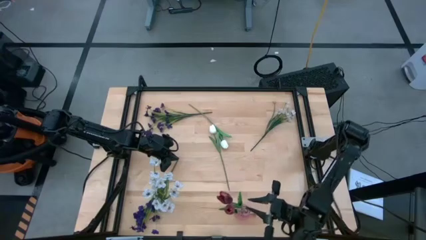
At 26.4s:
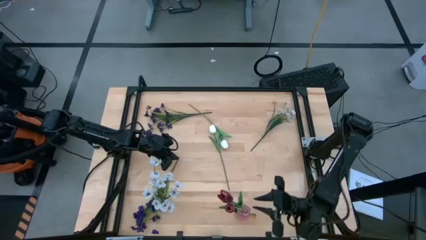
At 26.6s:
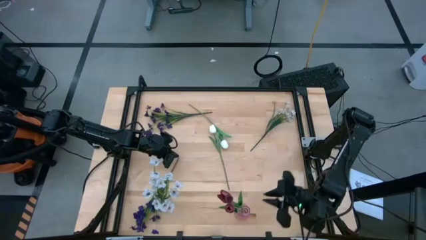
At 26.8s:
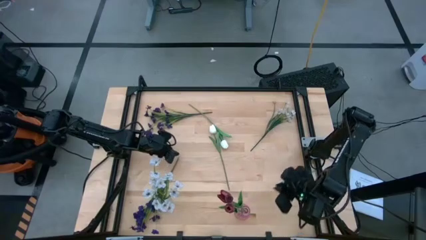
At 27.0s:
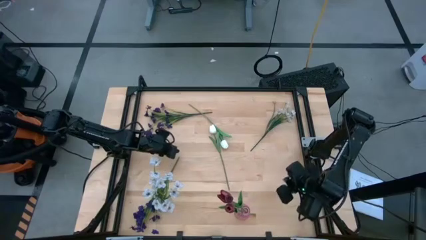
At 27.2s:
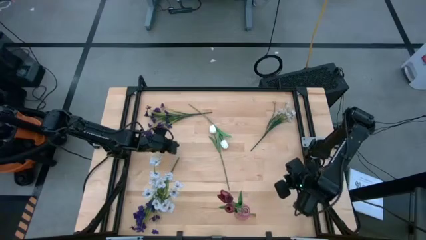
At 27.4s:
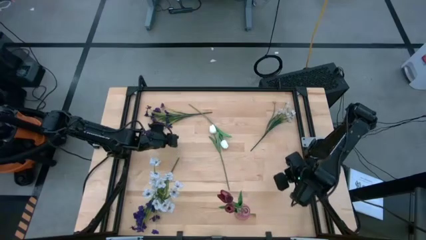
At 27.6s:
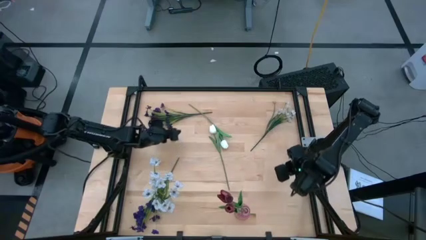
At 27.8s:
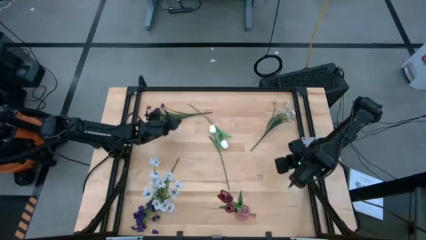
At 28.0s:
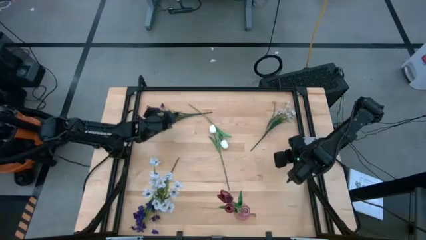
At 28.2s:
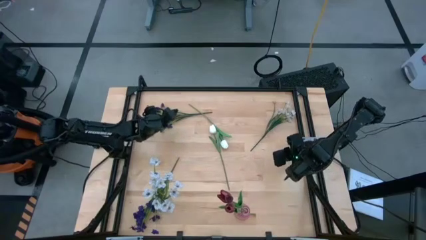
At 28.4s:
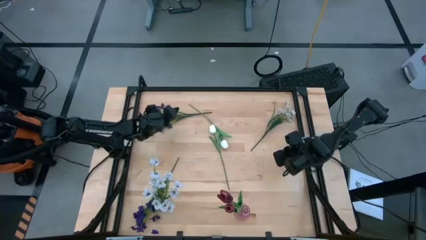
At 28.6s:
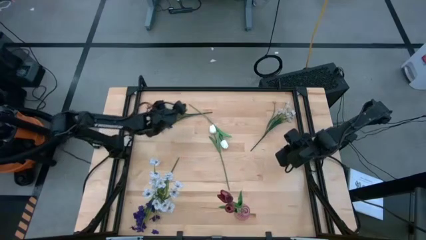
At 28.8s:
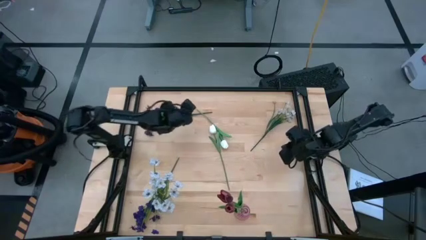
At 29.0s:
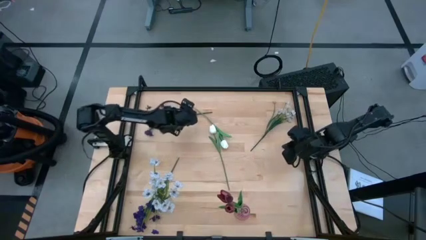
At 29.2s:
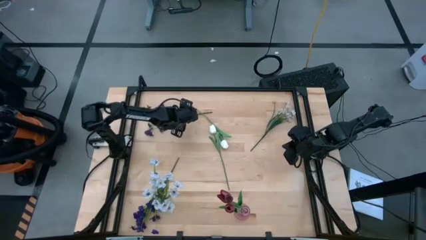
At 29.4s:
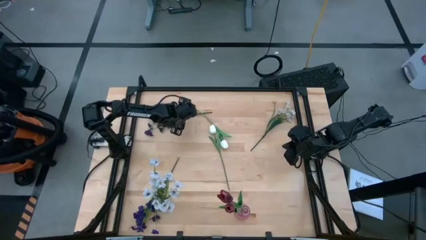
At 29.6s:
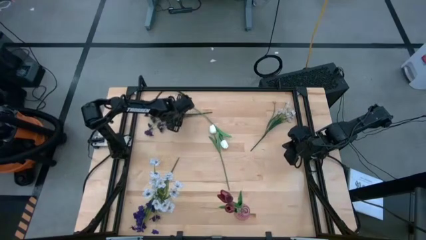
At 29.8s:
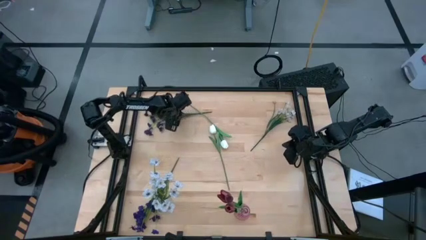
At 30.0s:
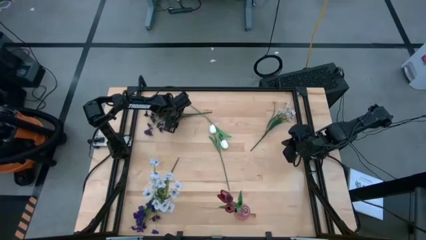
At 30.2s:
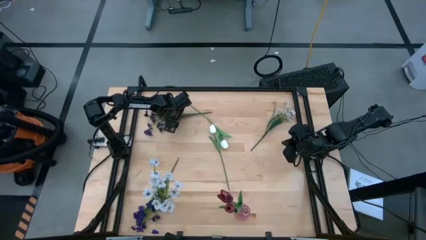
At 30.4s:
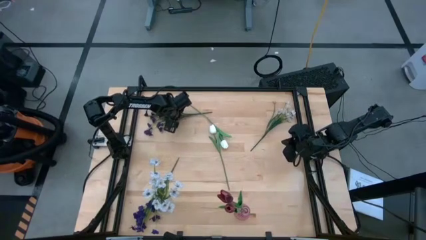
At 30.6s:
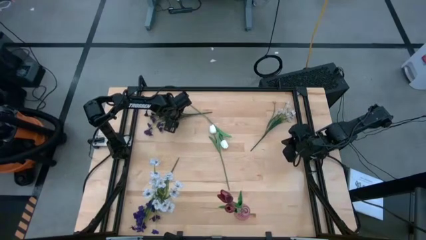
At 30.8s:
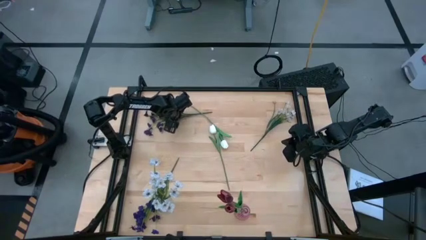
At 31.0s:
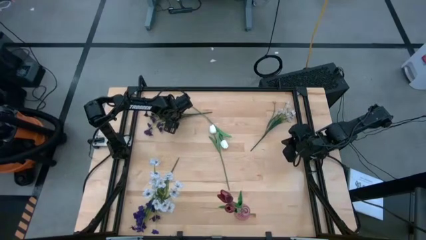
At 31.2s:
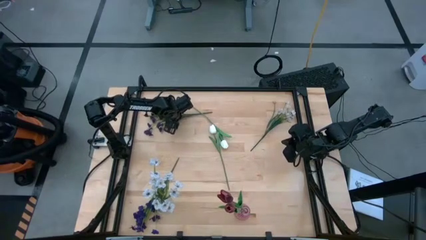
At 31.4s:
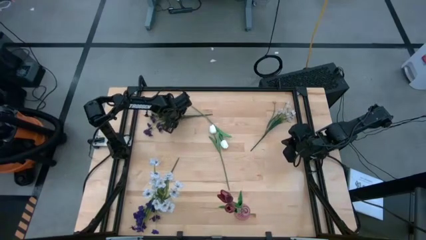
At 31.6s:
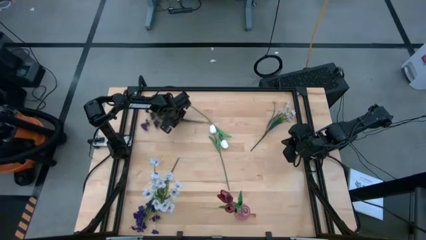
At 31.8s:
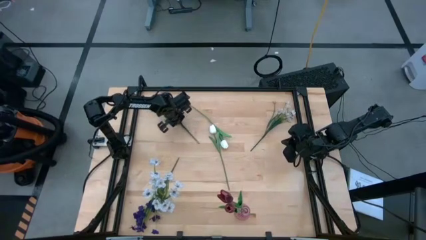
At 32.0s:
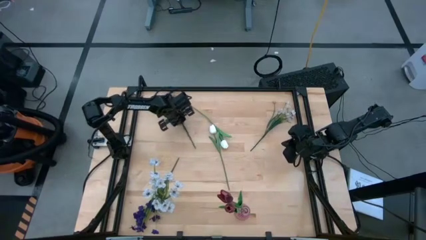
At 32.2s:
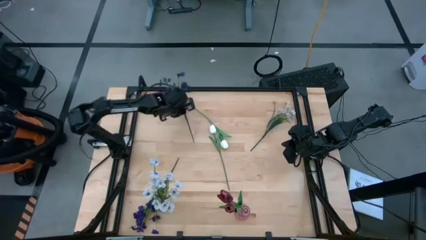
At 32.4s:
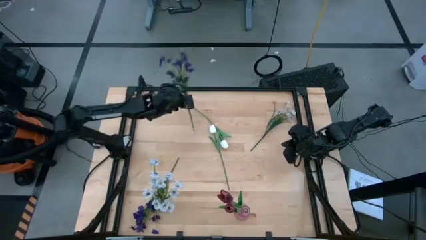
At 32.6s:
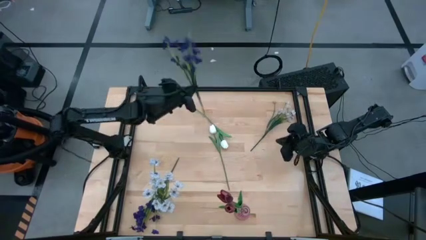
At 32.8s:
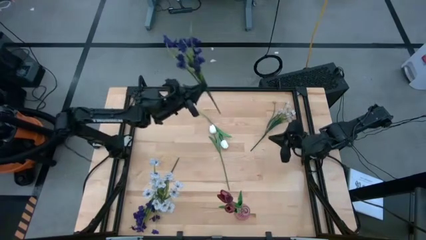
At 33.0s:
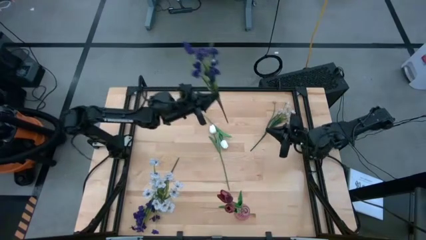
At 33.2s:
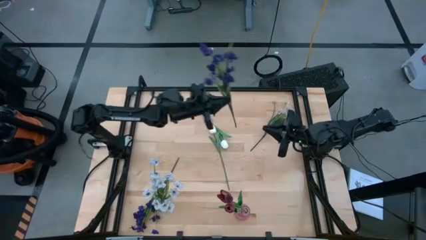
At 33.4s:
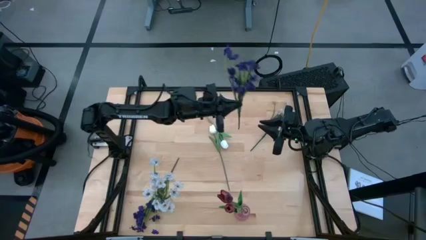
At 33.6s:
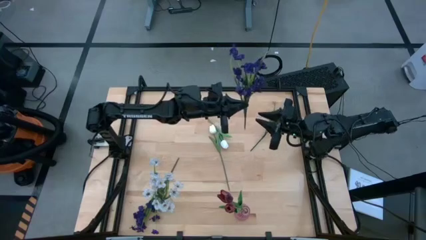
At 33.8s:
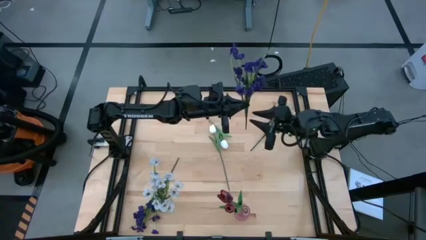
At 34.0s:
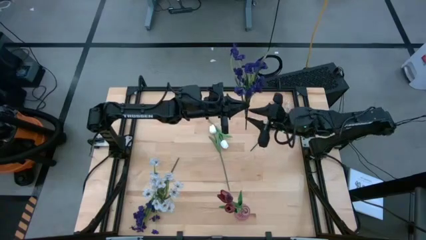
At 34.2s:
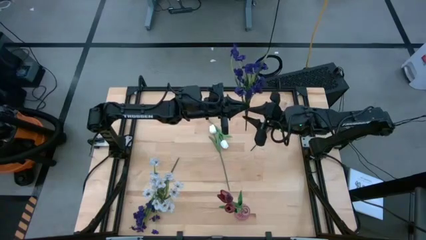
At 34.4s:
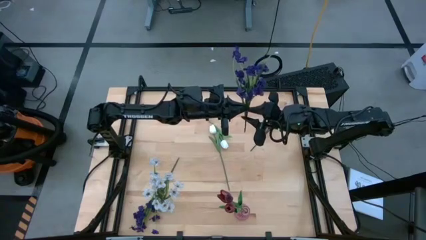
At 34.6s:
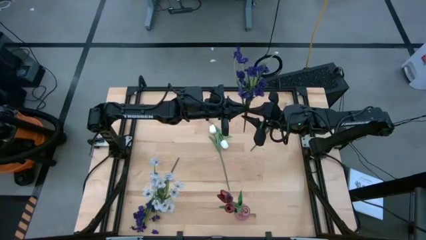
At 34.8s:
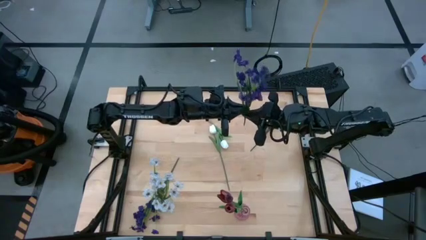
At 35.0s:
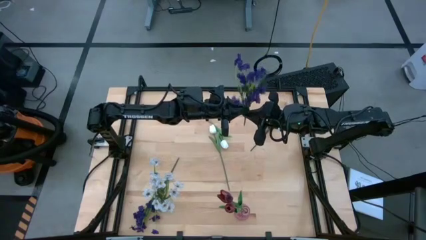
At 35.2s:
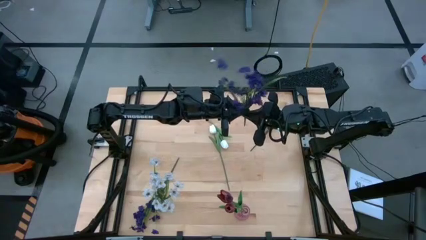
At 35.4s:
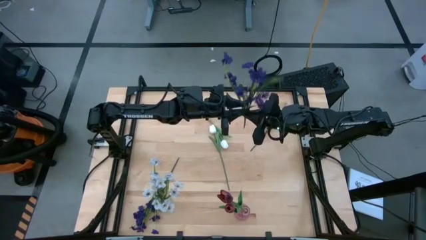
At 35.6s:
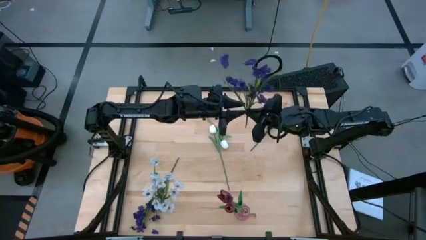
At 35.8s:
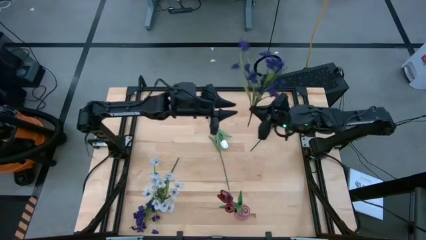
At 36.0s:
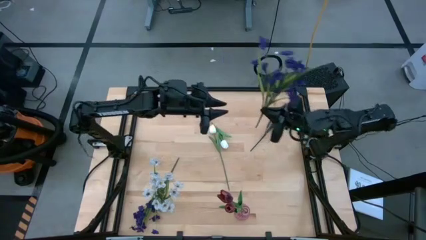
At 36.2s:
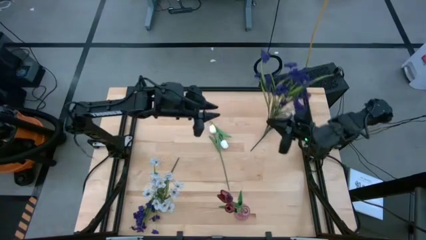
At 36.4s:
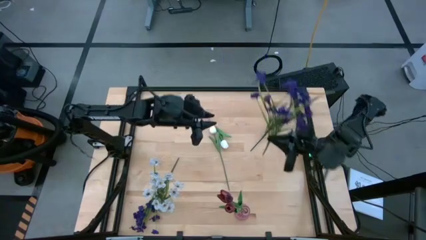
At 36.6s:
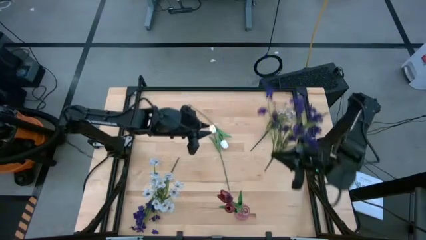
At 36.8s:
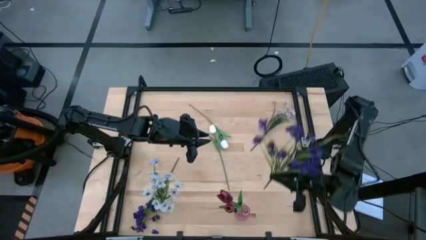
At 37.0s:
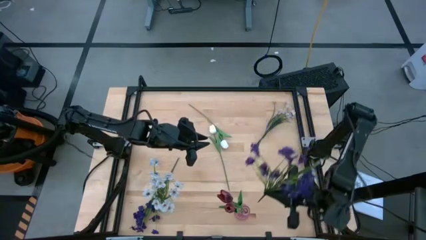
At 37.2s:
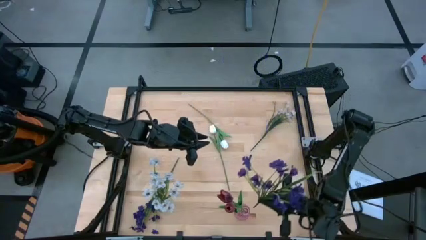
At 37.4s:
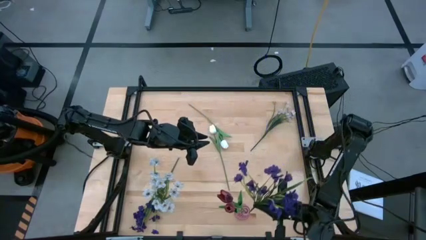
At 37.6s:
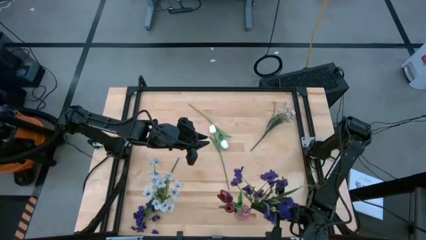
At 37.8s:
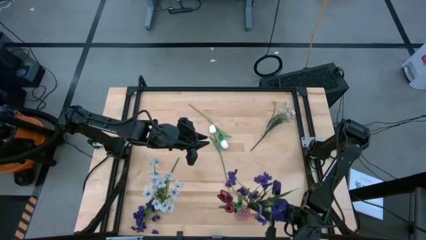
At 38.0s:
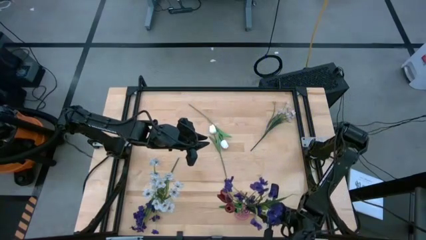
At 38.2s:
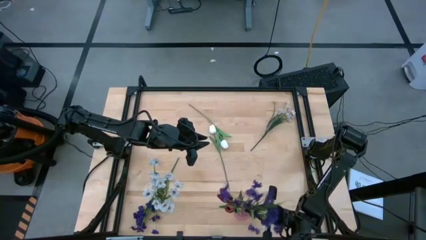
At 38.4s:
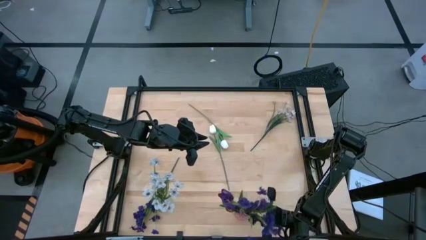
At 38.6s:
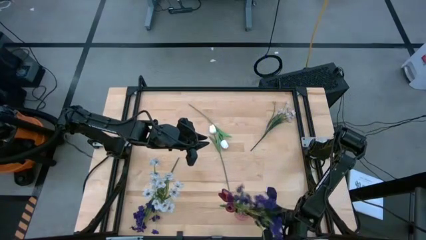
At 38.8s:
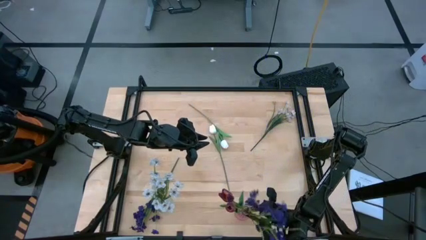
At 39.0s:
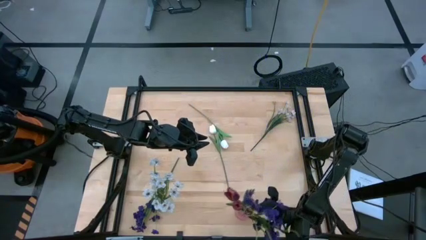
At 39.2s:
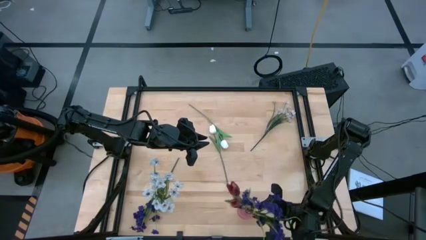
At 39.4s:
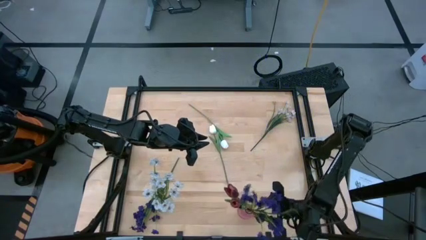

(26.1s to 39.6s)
Task: Sort flowers into vase by color
Put the top purple flower into the pink vase

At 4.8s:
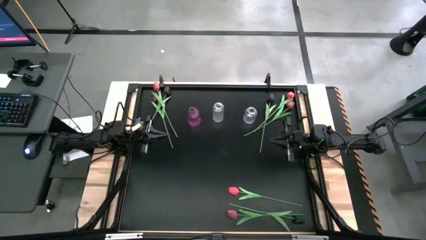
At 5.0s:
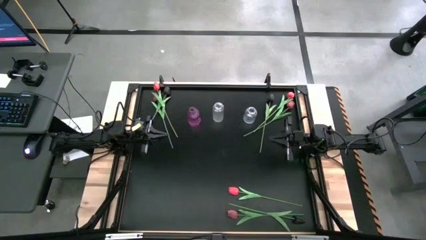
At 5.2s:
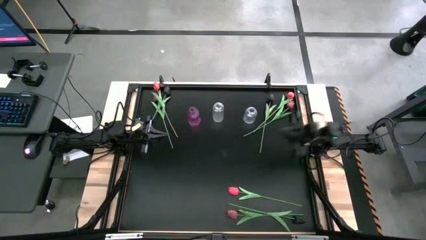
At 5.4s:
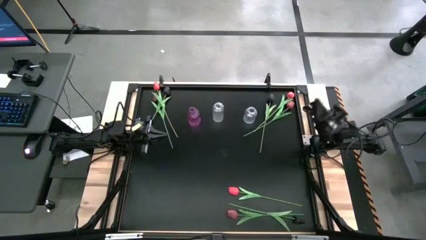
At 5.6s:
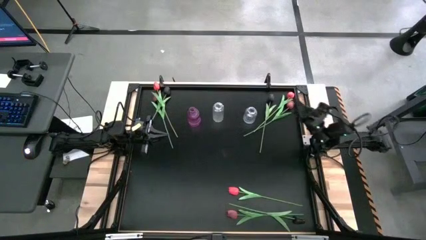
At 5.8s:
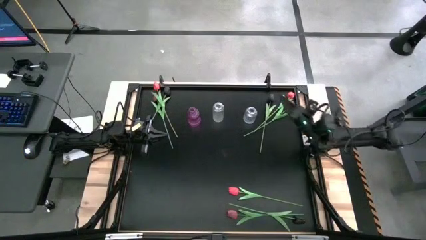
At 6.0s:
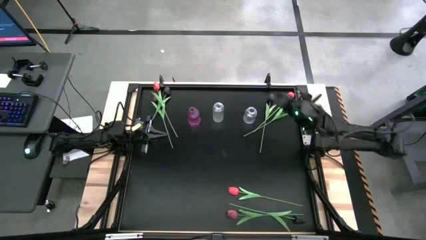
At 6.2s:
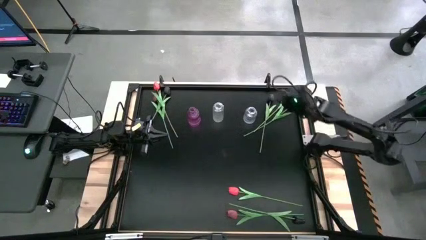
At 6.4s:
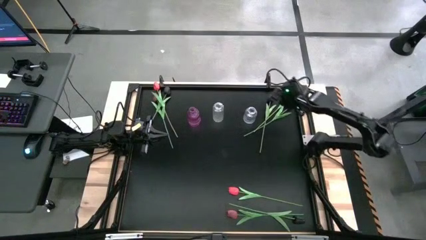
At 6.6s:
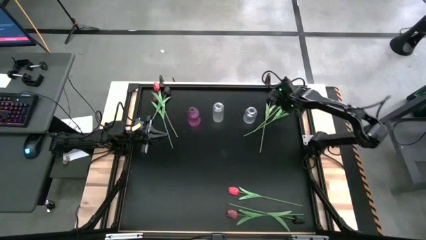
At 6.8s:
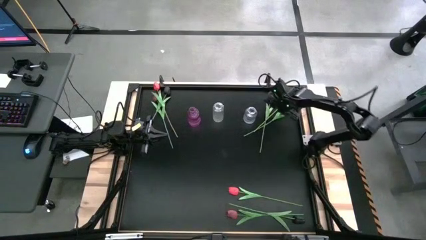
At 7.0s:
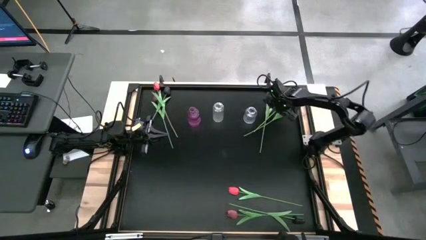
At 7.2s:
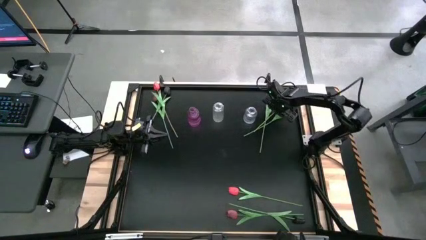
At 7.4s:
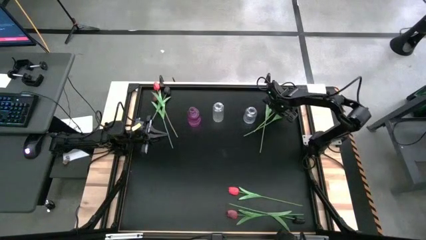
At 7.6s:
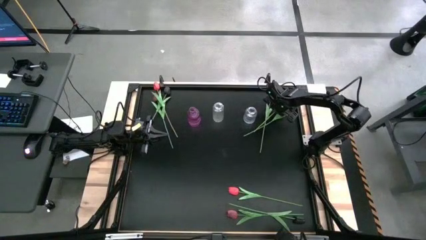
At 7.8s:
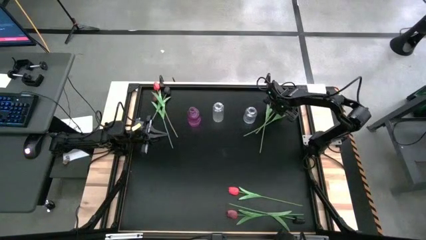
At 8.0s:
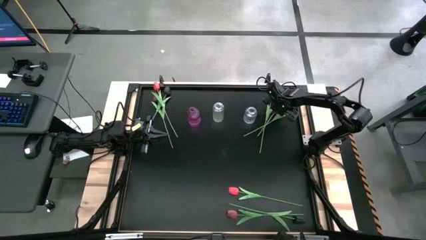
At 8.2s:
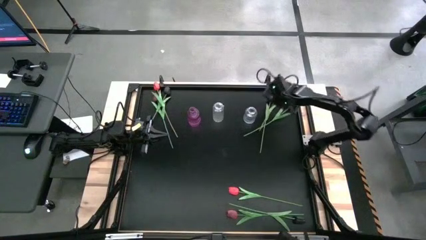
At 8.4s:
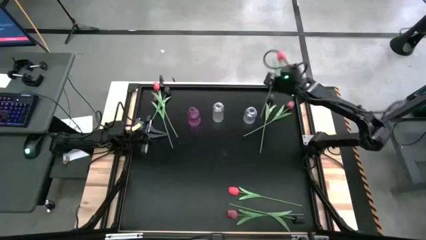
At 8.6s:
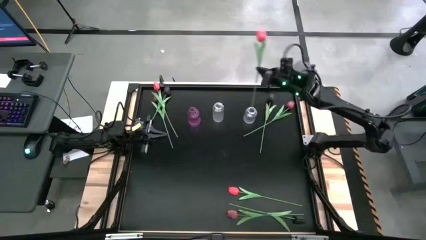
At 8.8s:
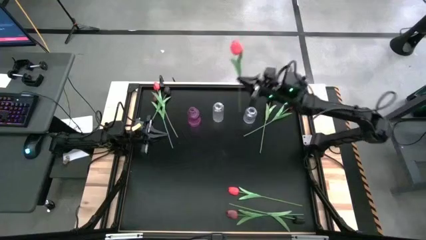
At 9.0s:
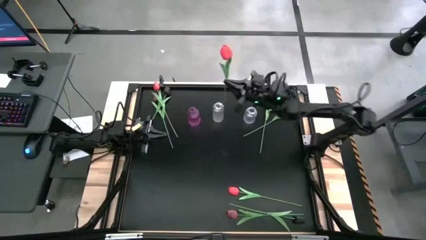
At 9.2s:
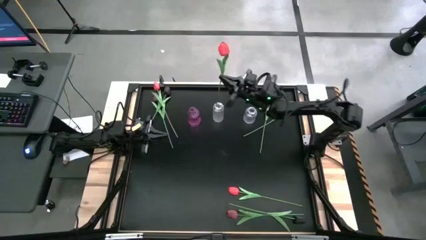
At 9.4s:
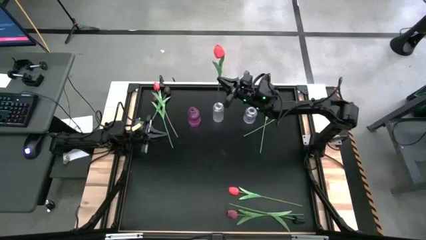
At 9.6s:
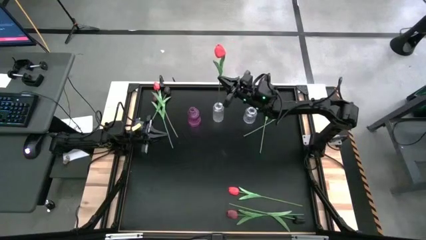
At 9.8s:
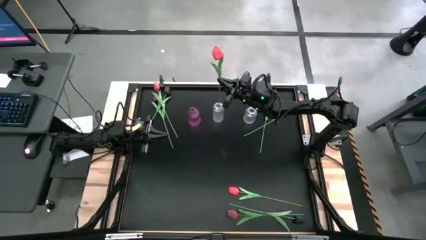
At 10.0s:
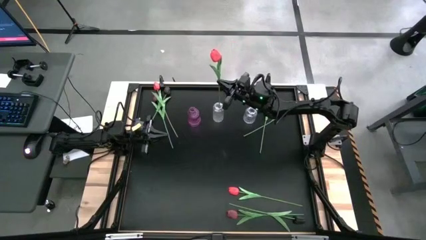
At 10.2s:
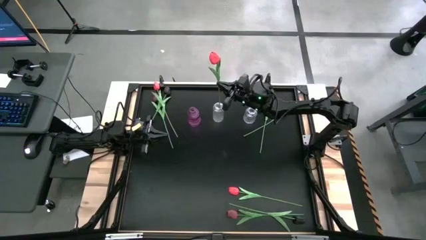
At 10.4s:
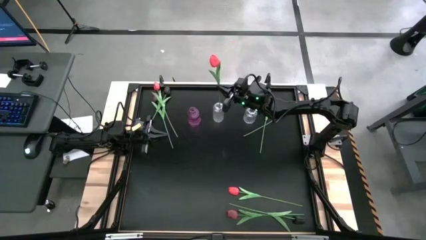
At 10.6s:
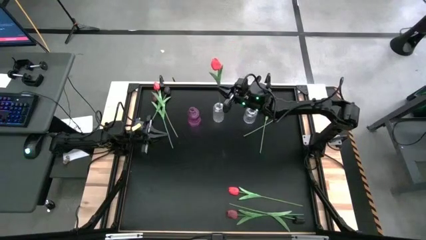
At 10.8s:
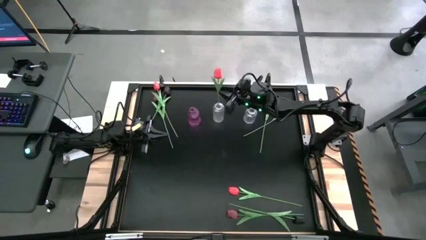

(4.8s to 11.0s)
Task: Sort flowers into vase by color
Put the top right red tulip into the left transparent flower vase
